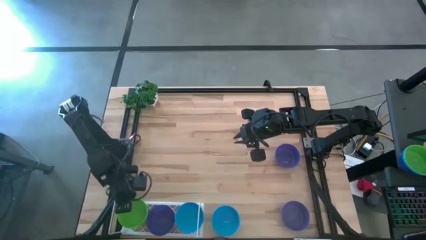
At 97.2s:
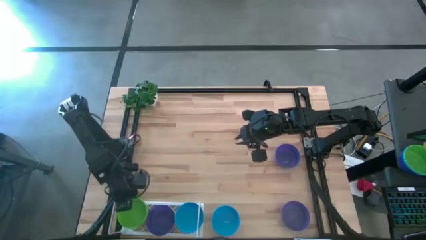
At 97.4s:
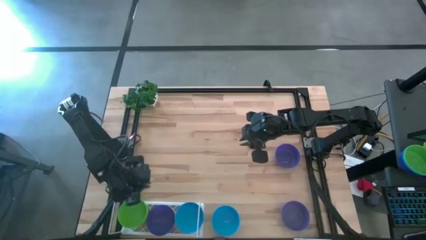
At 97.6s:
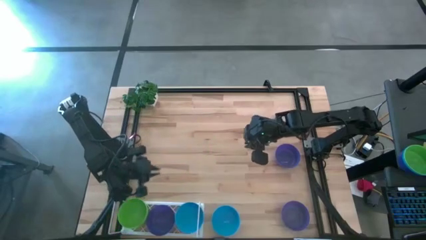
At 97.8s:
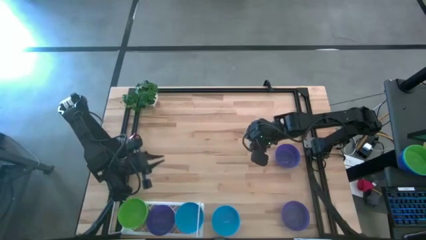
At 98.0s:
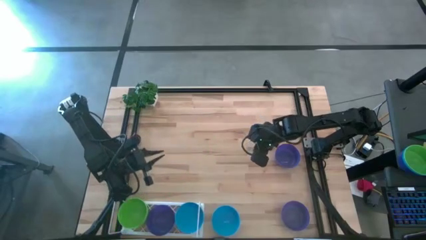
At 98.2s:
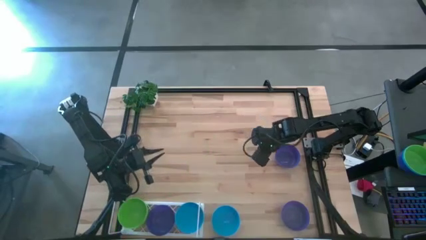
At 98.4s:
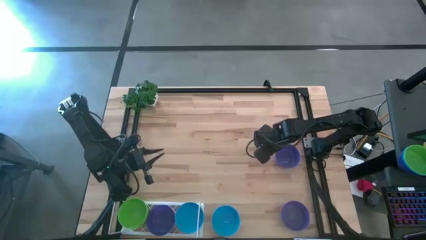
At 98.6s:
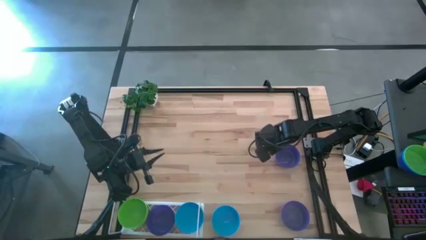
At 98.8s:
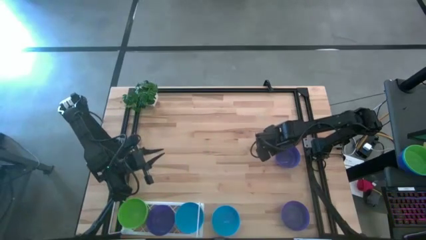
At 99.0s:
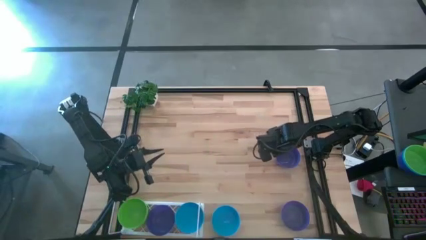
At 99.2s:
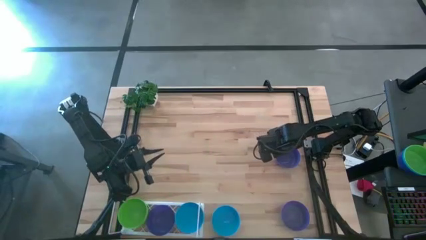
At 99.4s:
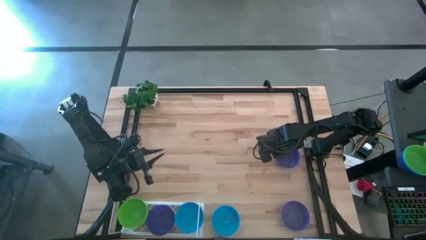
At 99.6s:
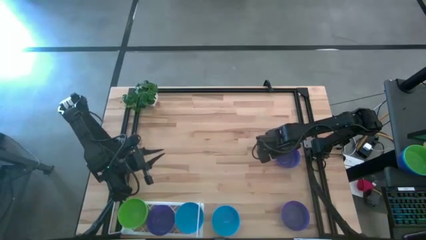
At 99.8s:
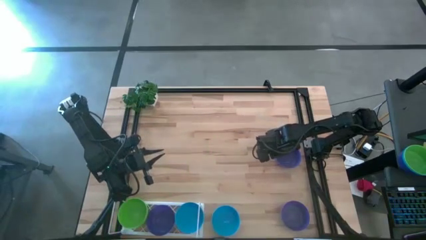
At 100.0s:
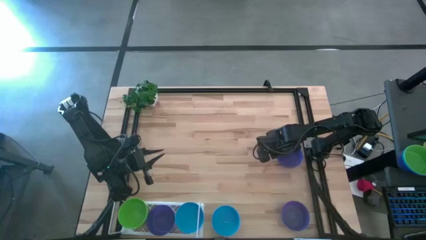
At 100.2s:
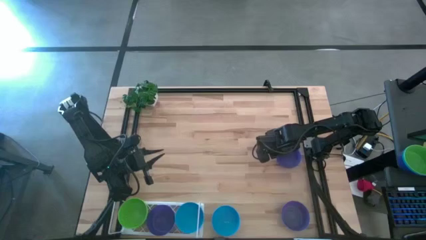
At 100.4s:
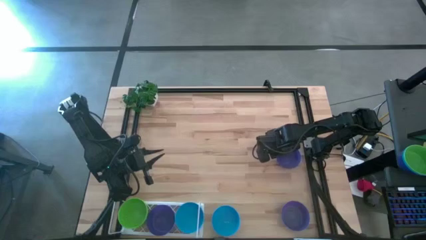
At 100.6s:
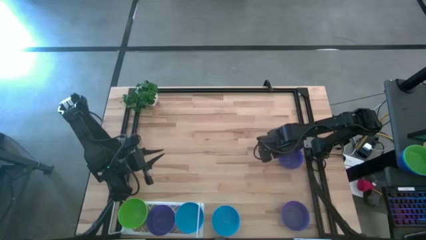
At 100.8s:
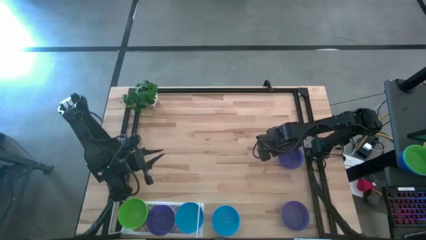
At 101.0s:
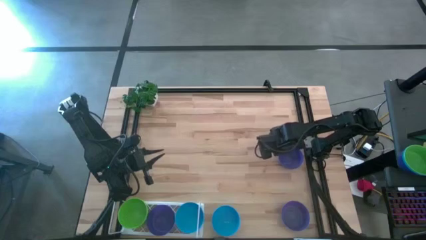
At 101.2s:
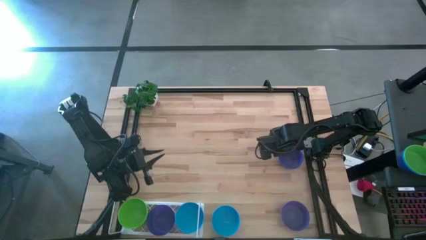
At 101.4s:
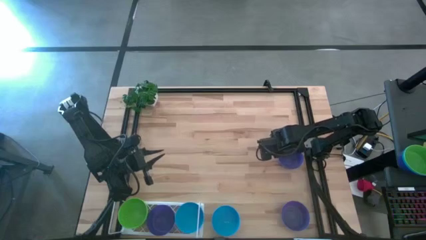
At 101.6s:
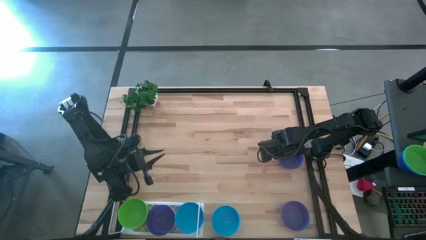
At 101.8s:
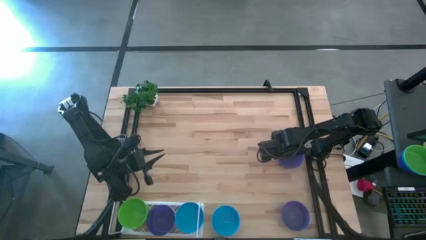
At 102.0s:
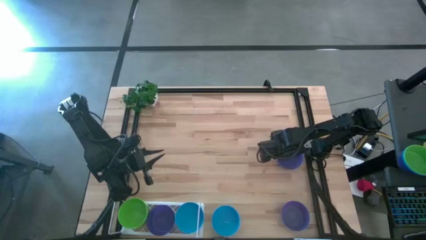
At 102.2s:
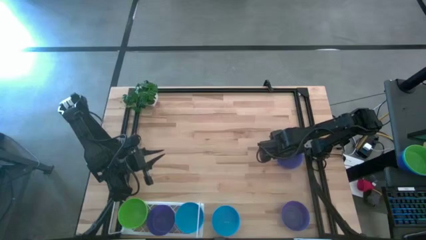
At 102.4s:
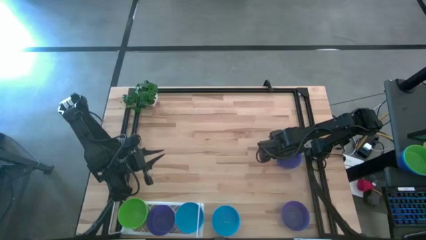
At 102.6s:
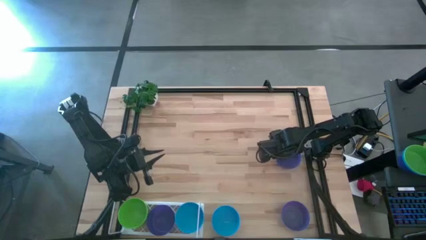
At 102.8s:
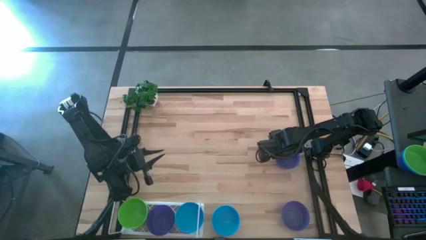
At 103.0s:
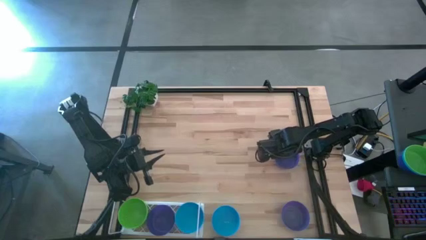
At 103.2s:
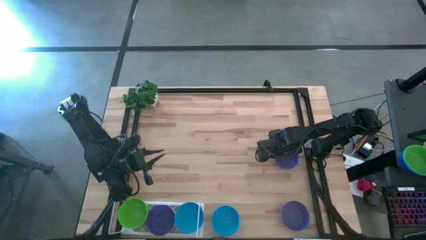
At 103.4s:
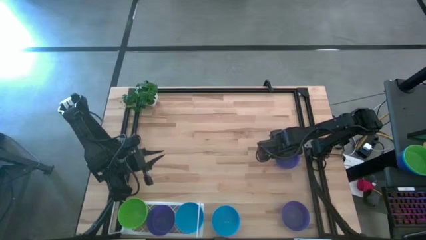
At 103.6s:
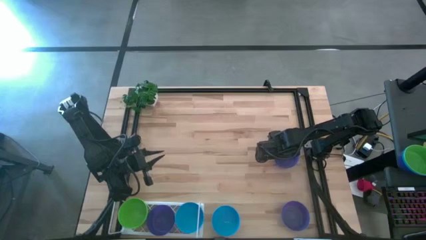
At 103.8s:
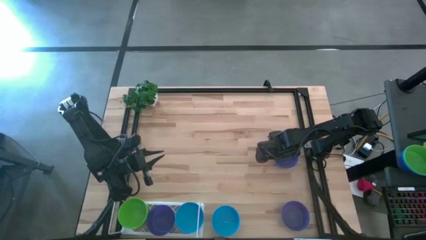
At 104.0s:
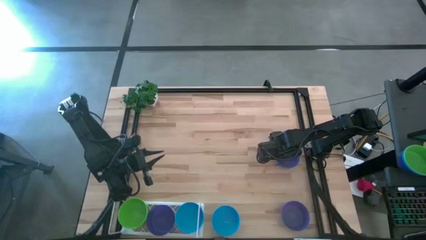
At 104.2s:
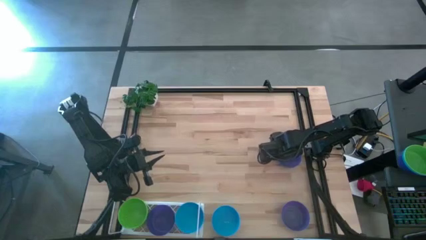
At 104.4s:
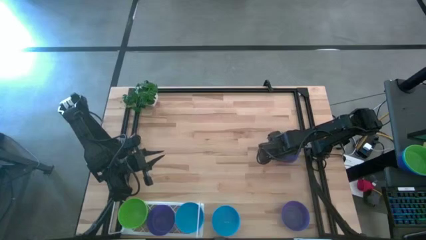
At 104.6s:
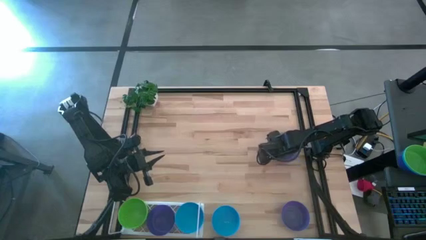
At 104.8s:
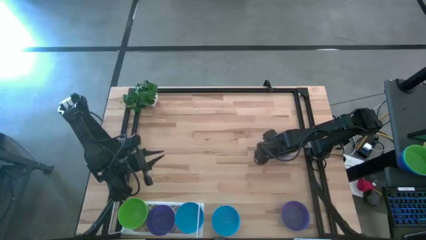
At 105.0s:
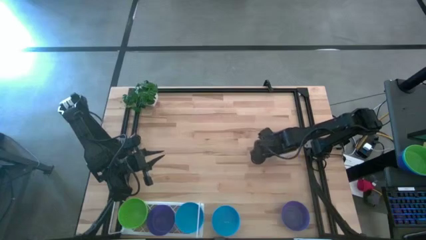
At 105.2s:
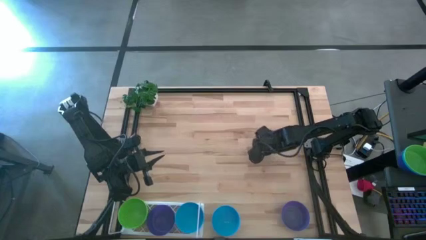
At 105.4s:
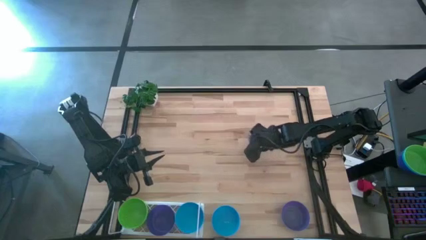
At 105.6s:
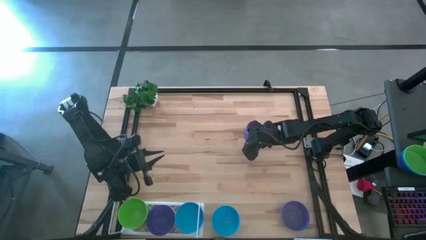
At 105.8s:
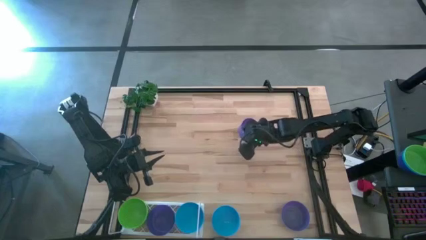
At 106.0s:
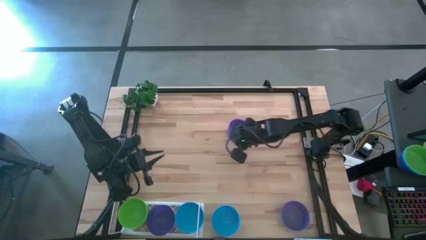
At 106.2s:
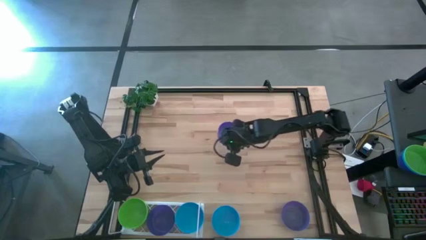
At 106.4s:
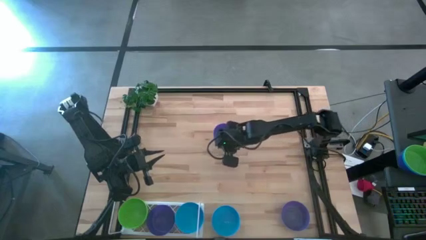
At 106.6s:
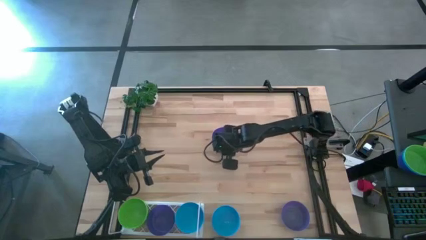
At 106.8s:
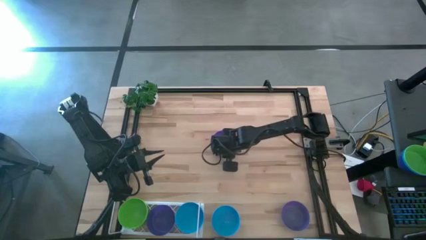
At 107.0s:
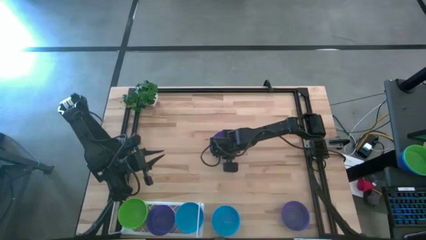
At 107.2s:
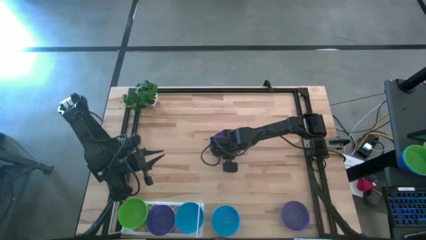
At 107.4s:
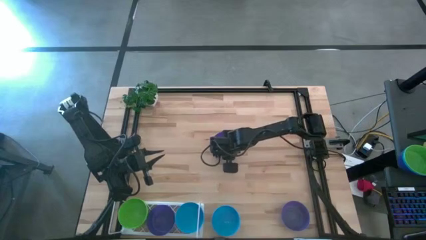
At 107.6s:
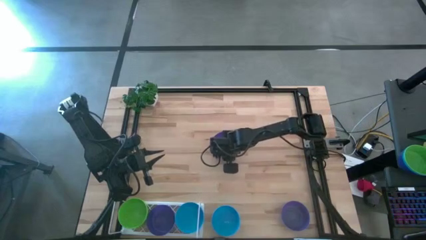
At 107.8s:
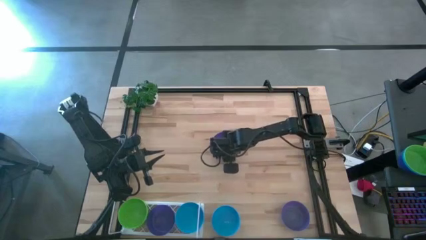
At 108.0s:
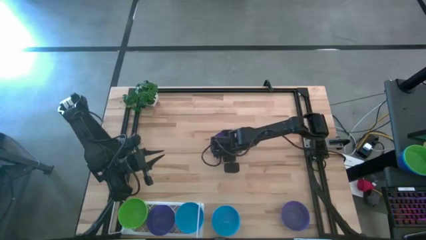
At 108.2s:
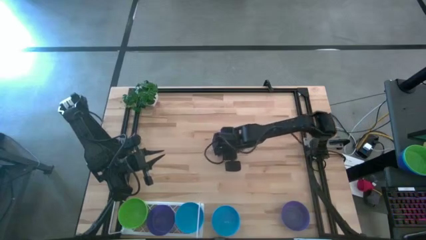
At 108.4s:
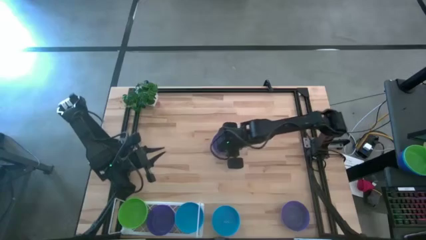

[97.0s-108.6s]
Task: Pick & Place Mini bowls
Stack the top purple bowl on the purple bowl on the shelf
